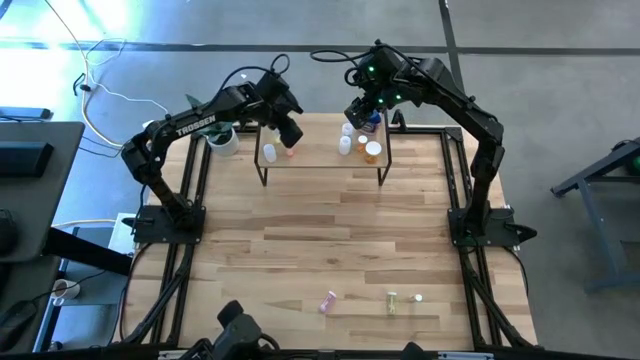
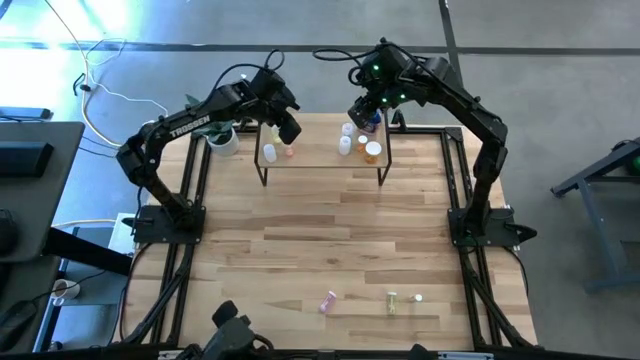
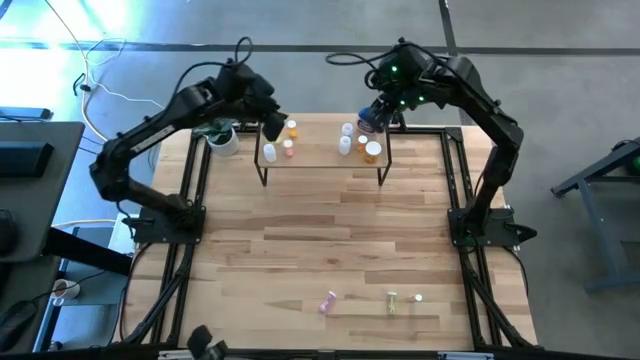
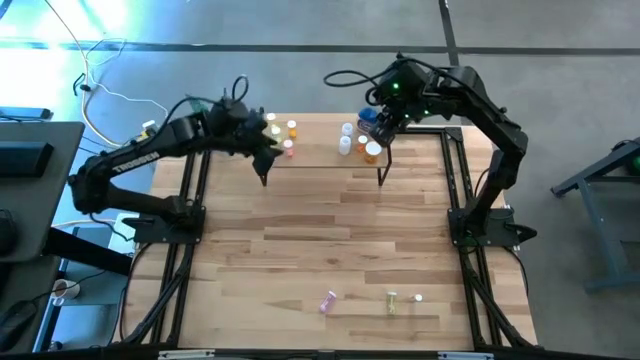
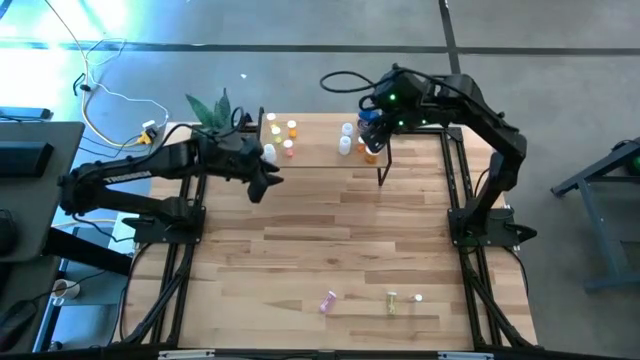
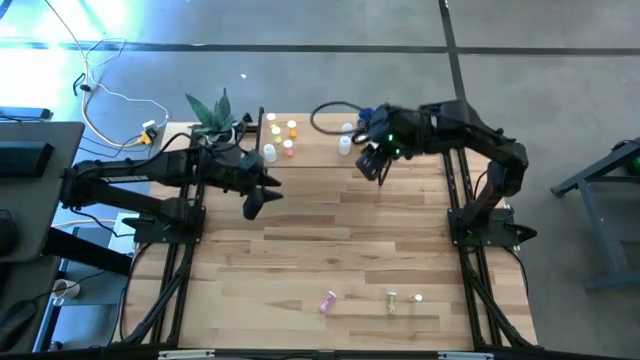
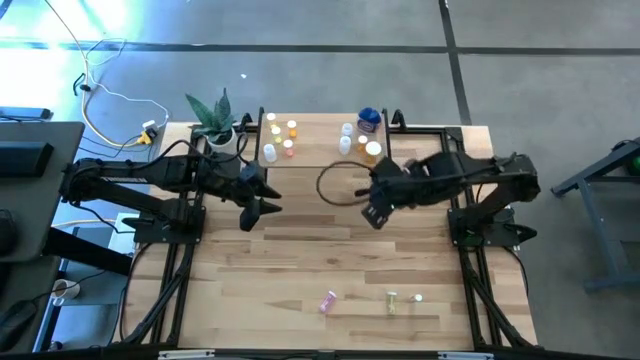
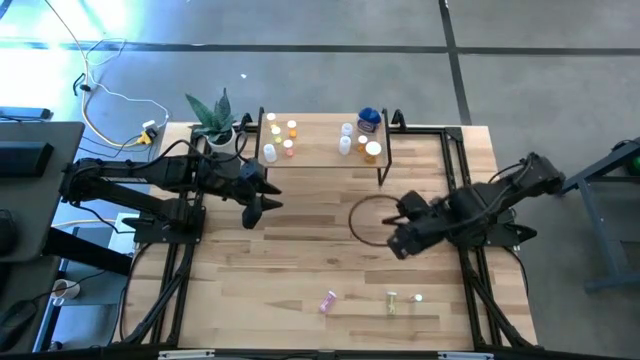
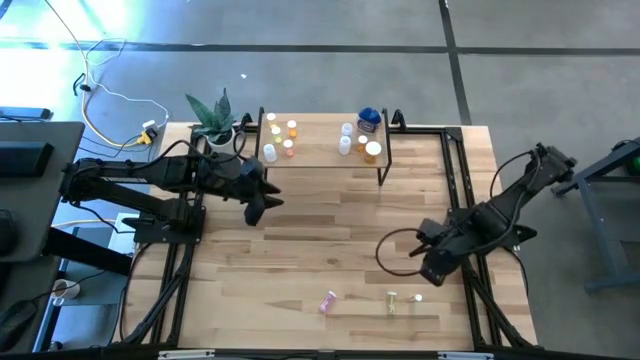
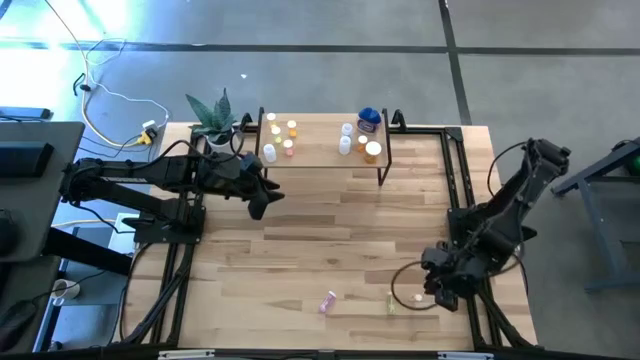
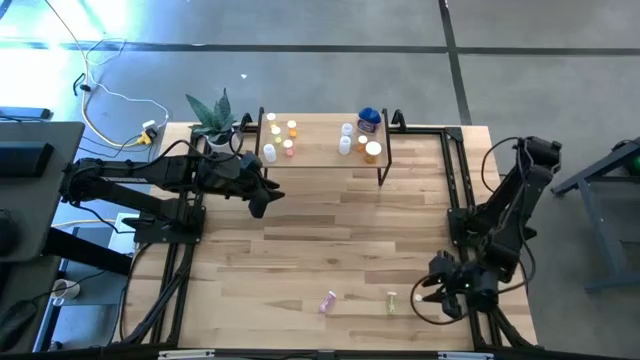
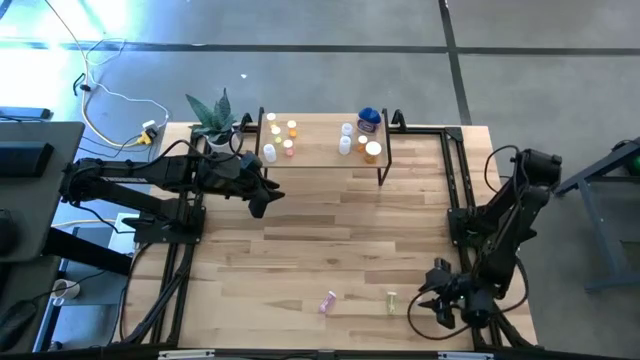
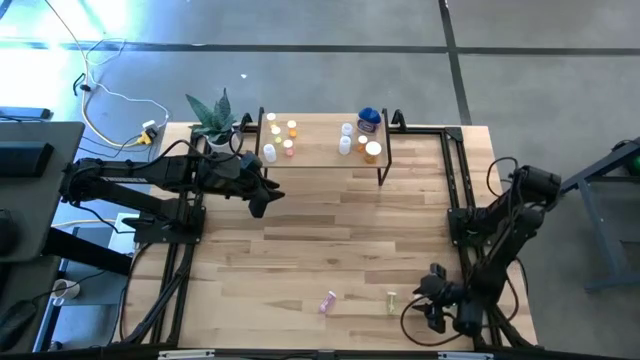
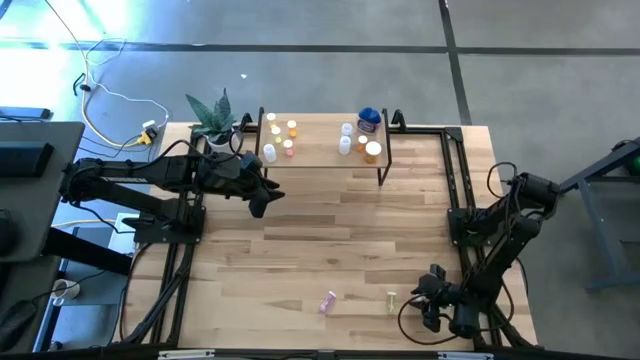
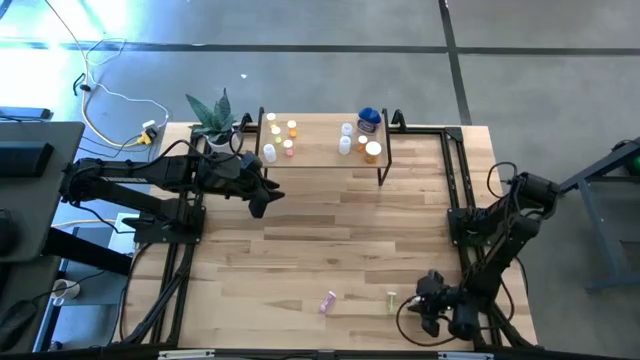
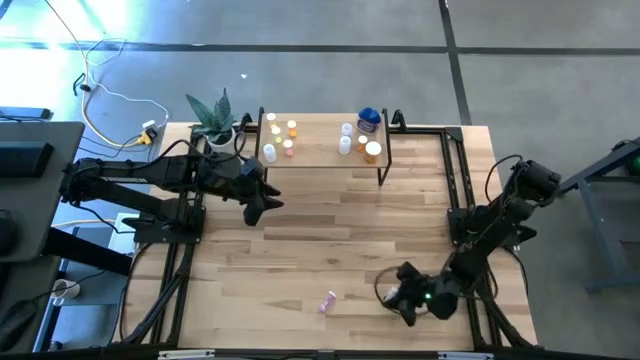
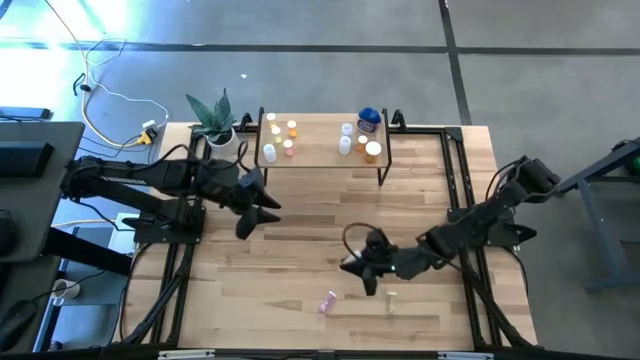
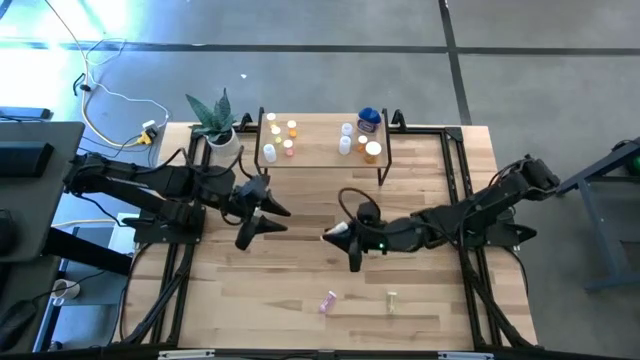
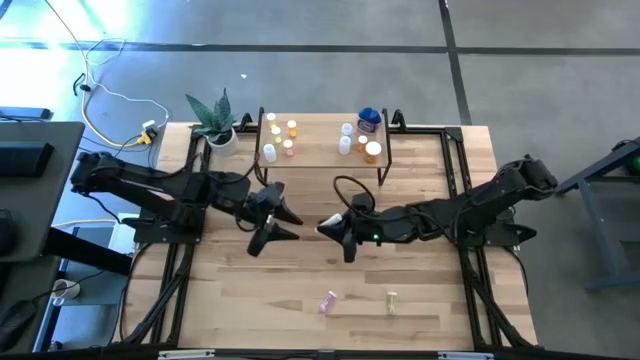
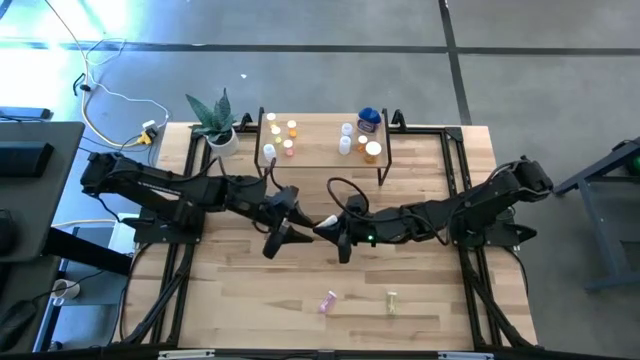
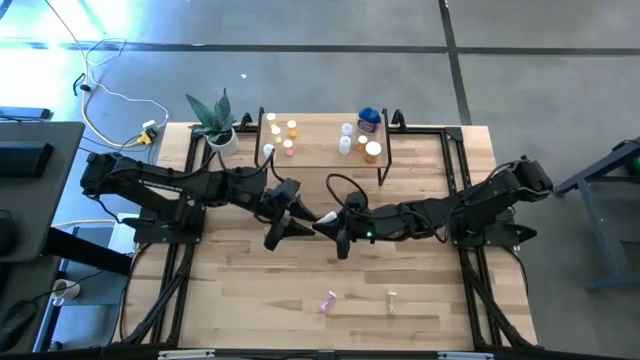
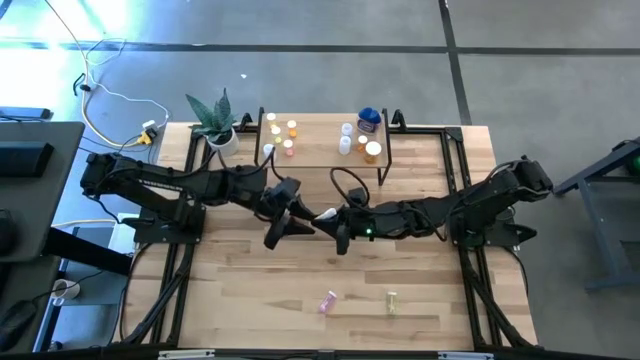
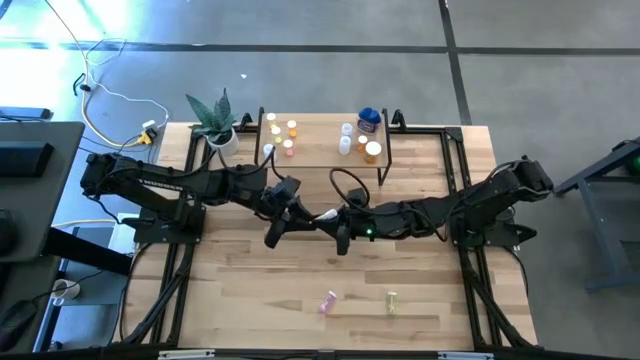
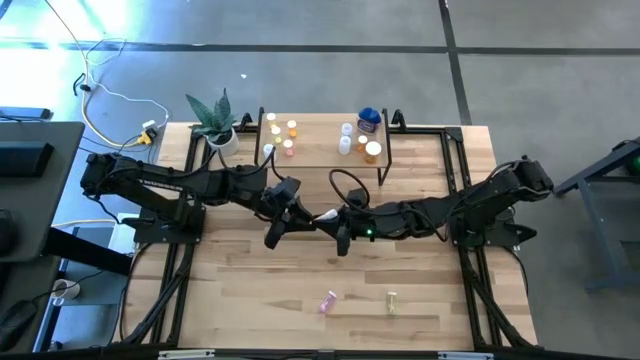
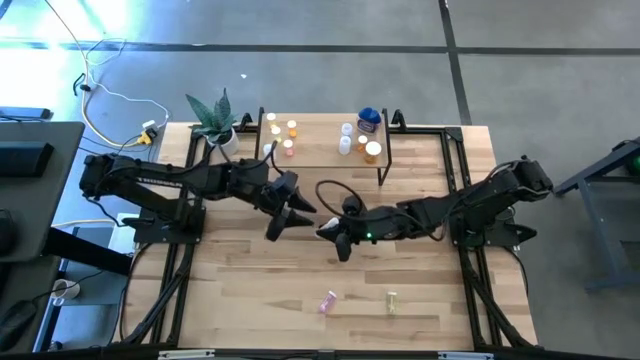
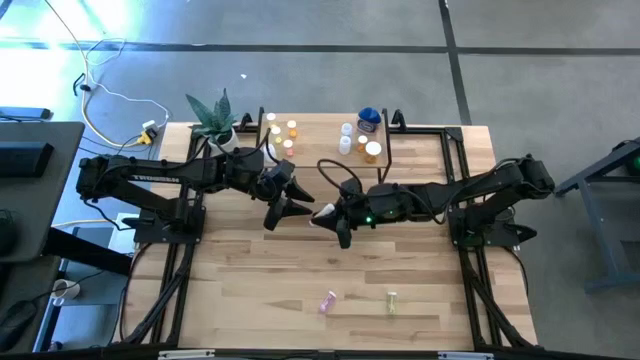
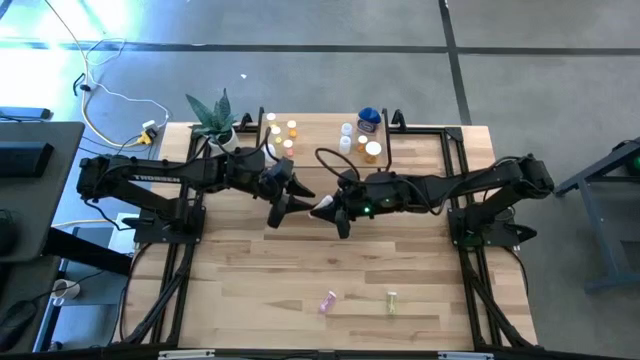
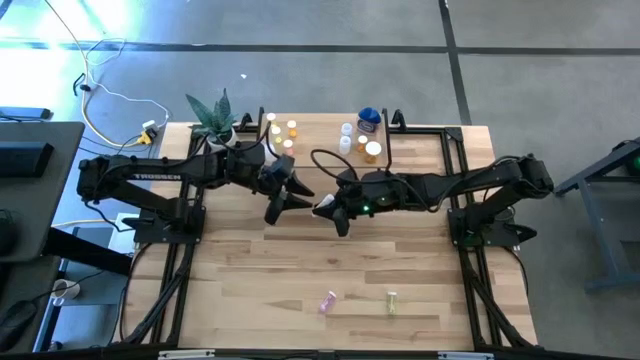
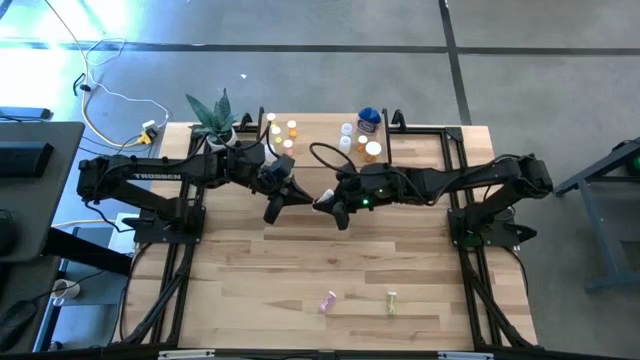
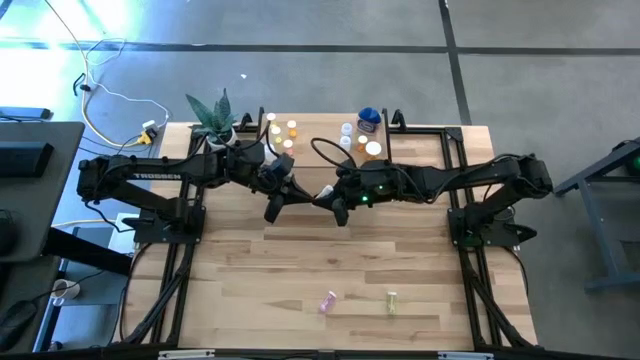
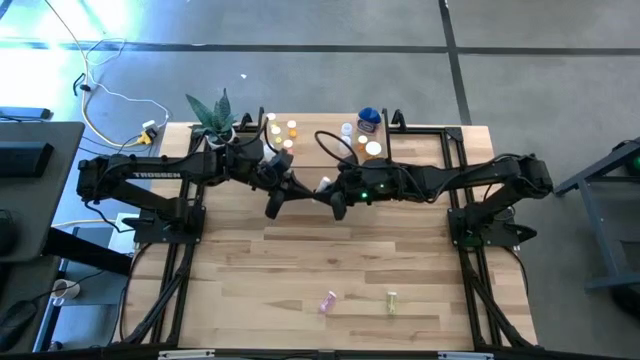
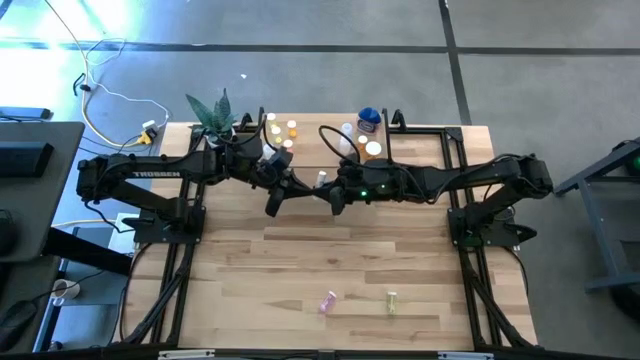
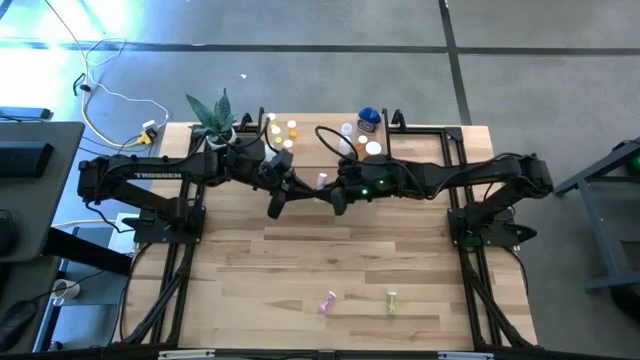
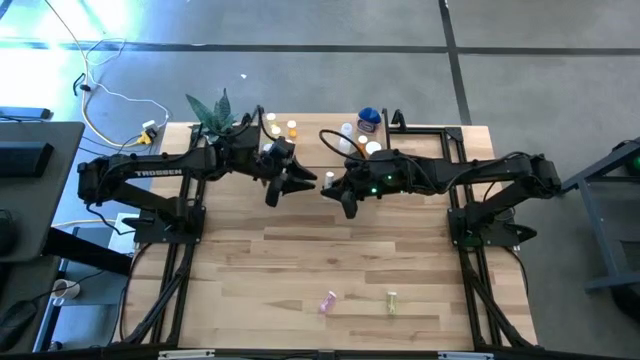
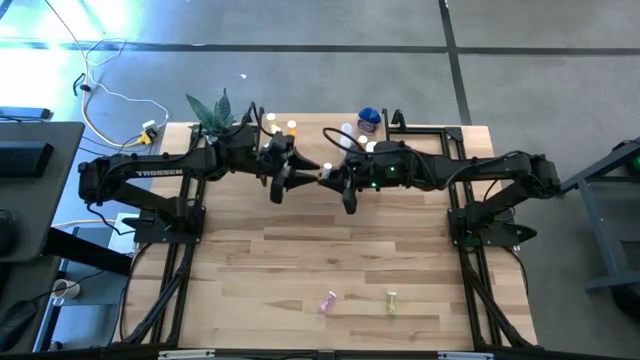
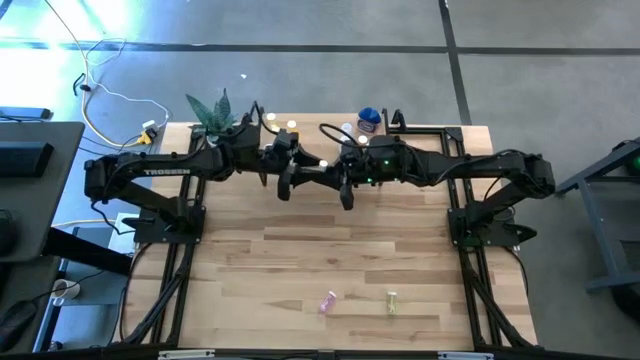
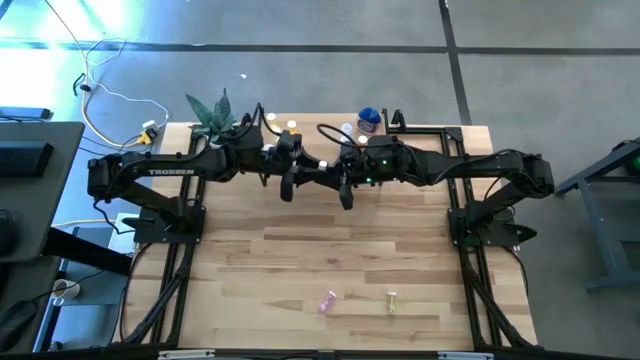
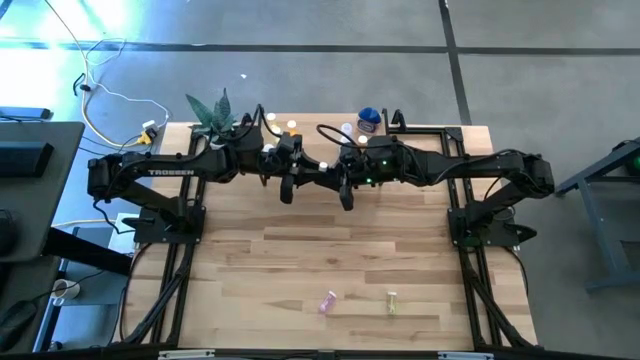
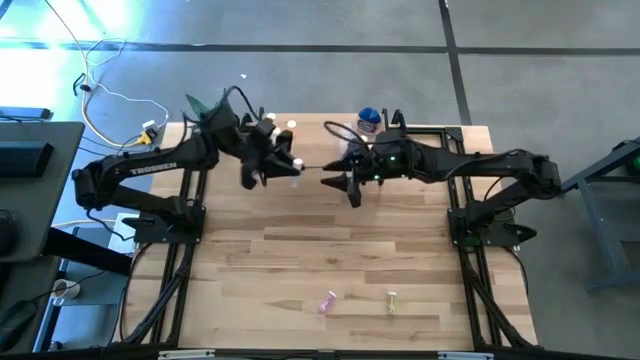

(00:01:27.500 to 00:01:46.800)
Task: Pick and place medicine bottles onto shelf by color
Put the small white pill bottle on the shelf

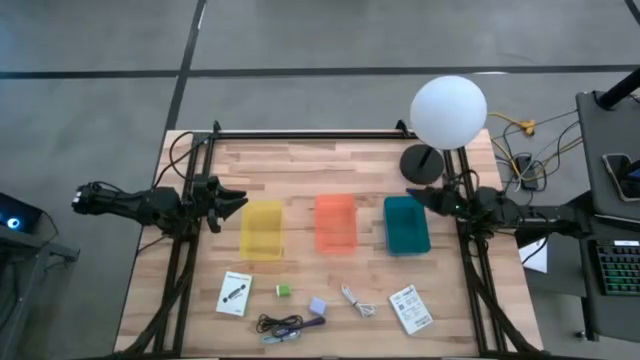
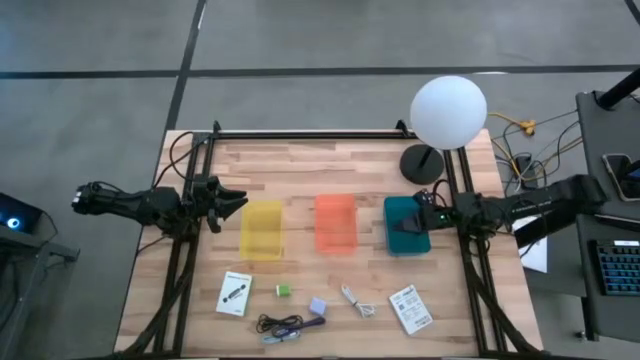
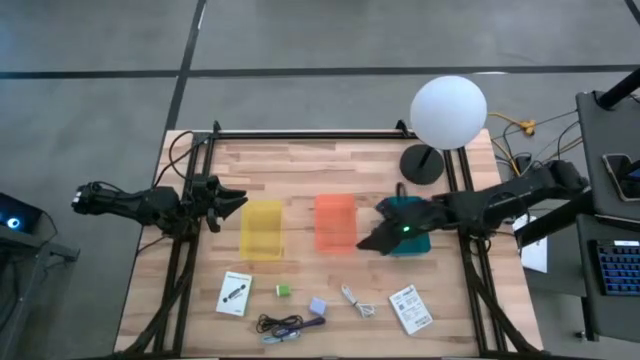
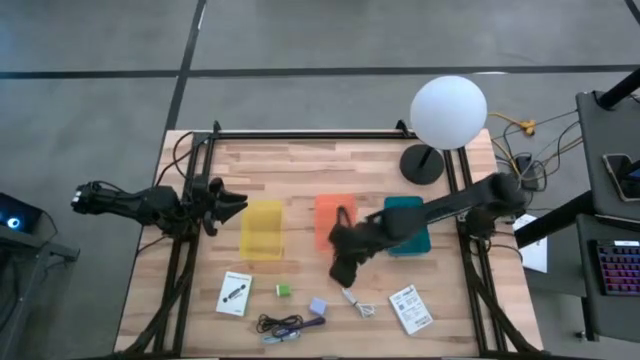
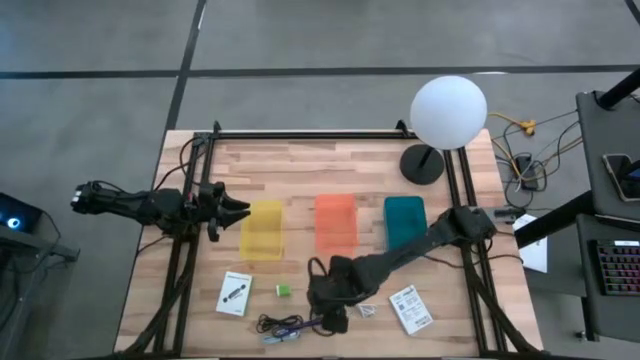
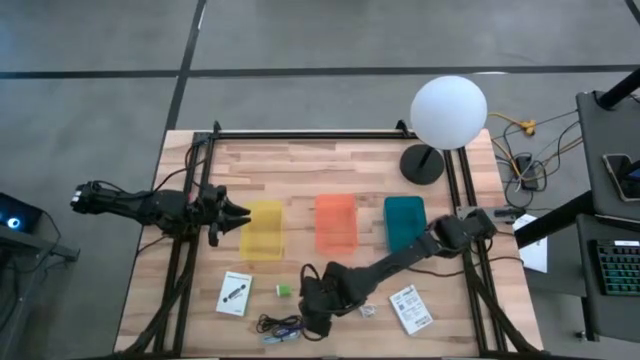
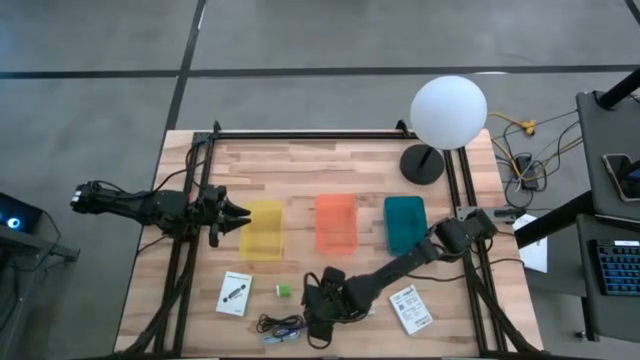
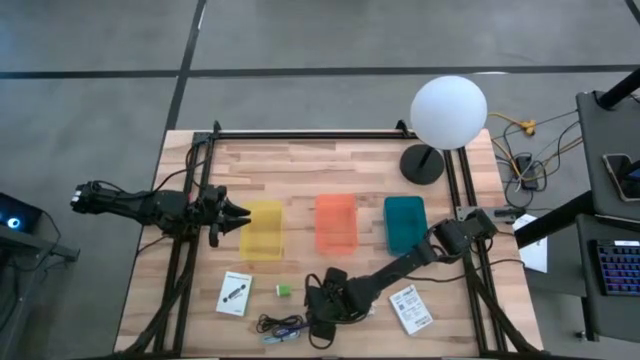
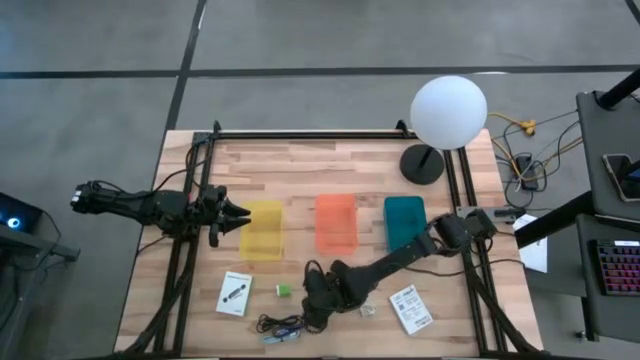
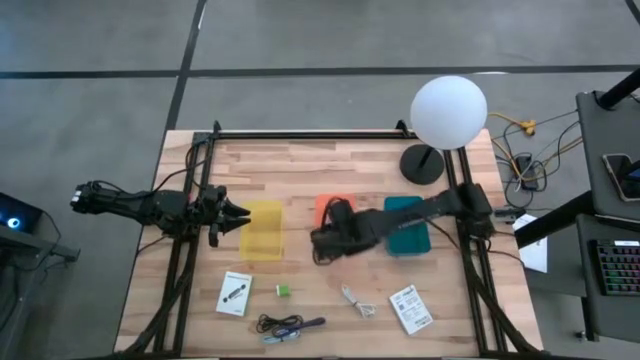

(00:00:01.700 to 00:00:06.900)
Task: Pick and place items into bin
Put the light blue charger adapter into the orange bin
